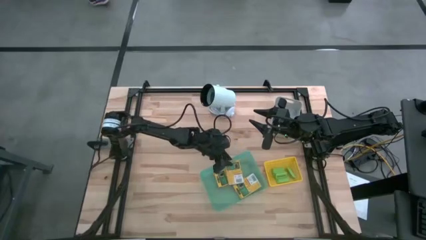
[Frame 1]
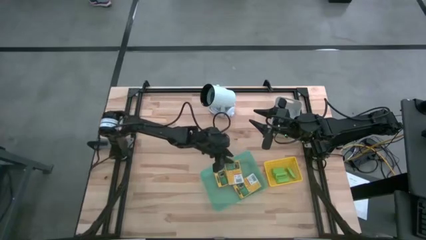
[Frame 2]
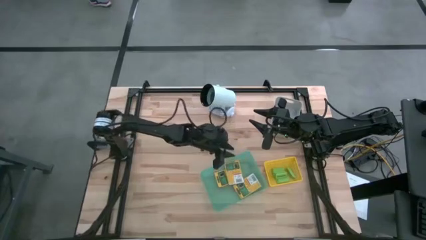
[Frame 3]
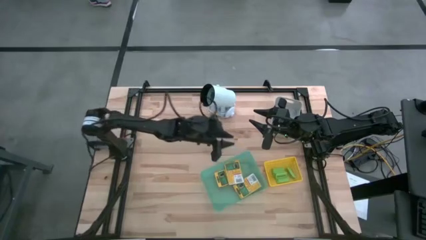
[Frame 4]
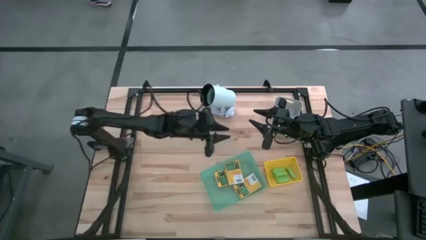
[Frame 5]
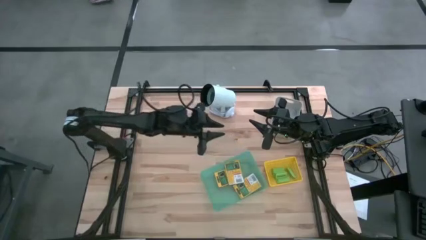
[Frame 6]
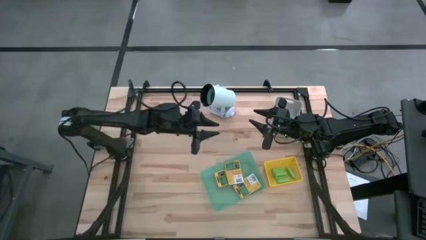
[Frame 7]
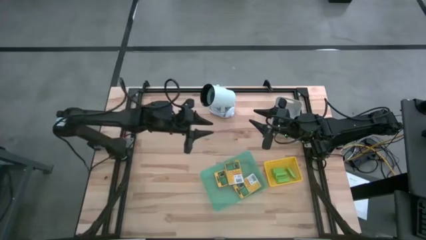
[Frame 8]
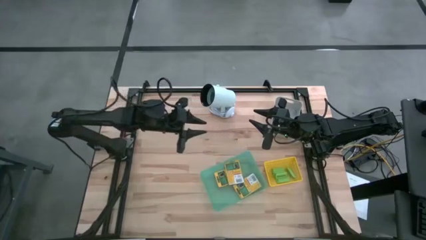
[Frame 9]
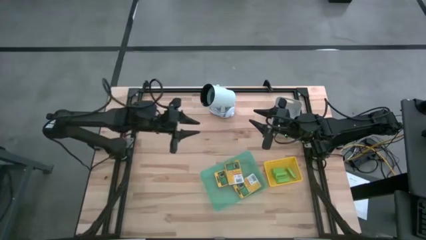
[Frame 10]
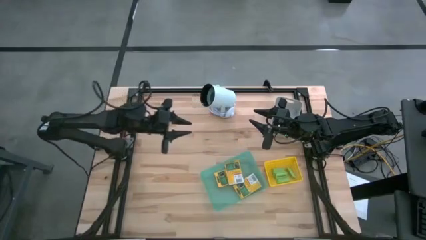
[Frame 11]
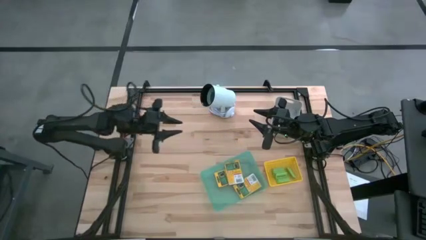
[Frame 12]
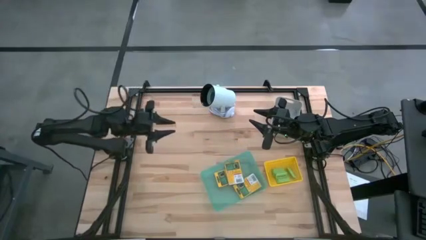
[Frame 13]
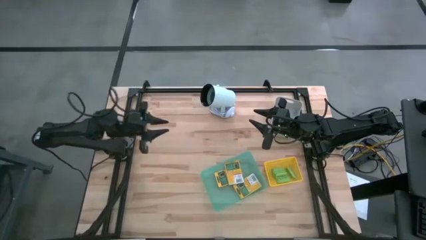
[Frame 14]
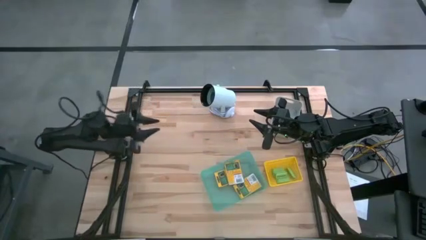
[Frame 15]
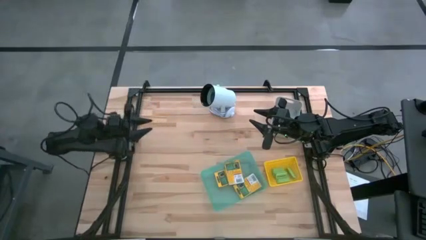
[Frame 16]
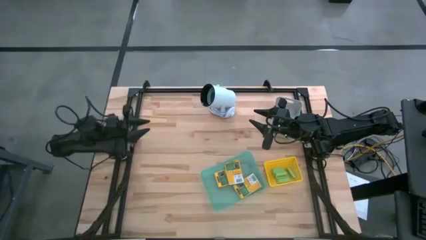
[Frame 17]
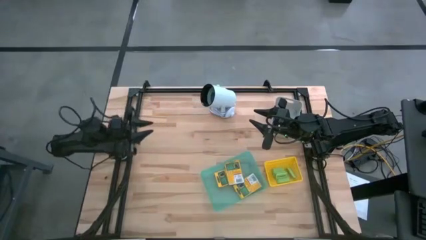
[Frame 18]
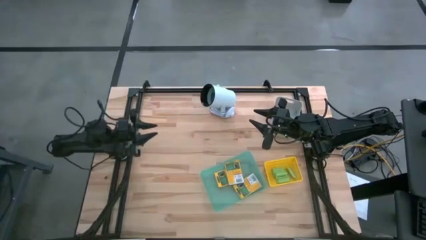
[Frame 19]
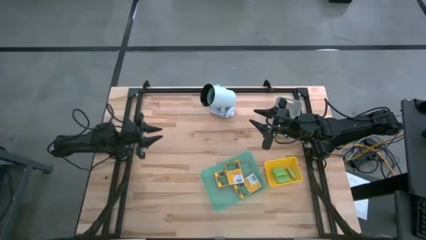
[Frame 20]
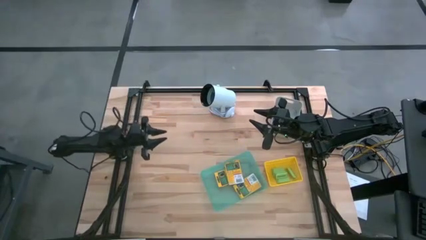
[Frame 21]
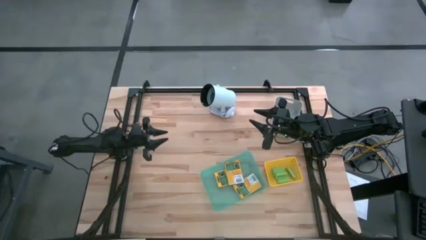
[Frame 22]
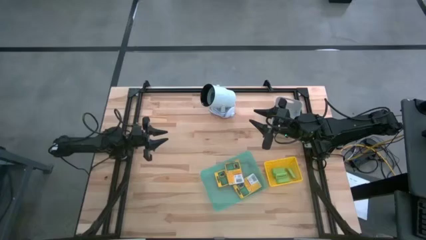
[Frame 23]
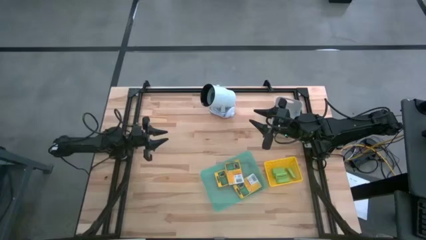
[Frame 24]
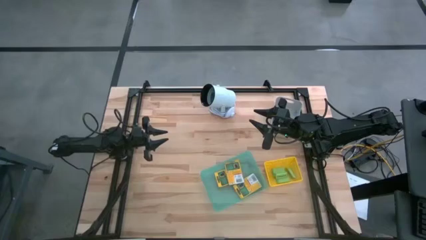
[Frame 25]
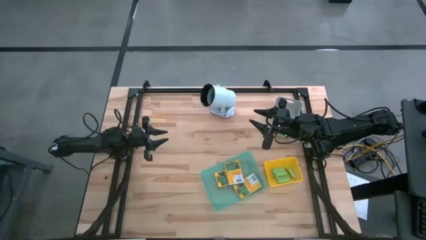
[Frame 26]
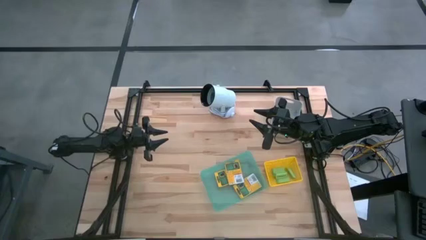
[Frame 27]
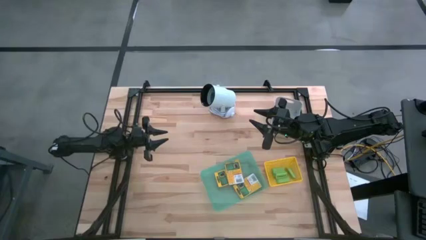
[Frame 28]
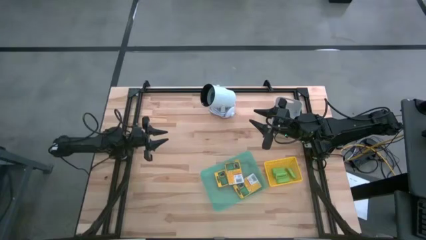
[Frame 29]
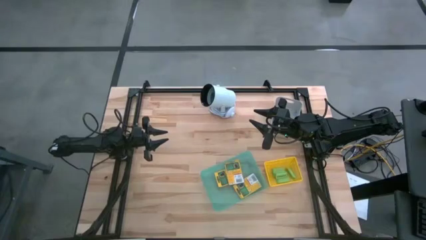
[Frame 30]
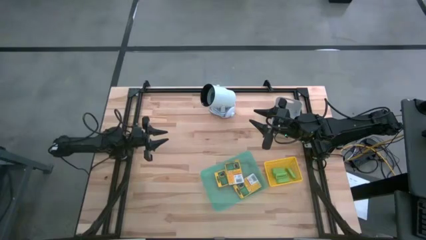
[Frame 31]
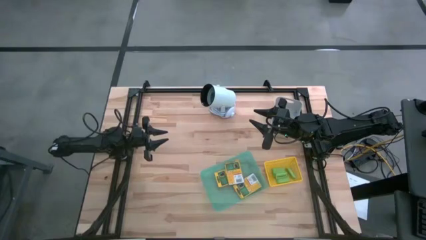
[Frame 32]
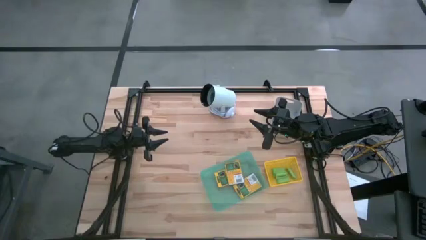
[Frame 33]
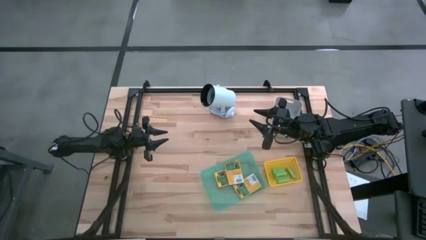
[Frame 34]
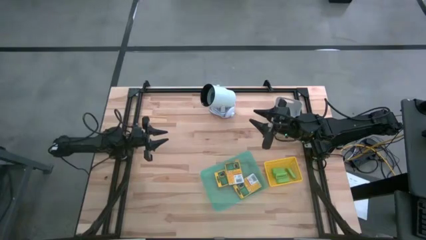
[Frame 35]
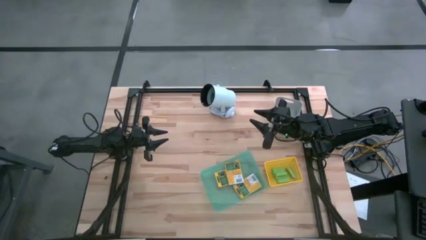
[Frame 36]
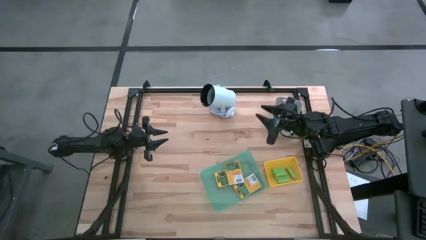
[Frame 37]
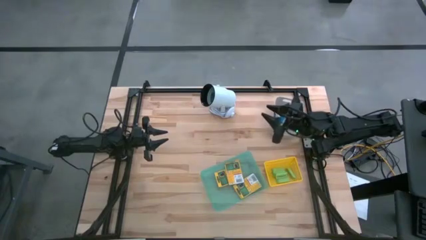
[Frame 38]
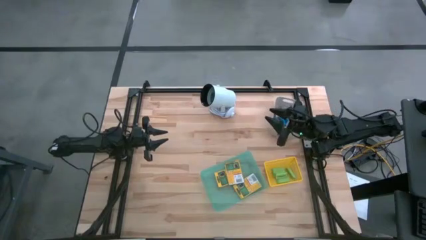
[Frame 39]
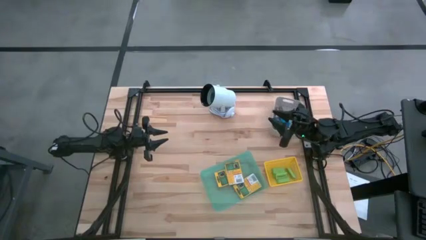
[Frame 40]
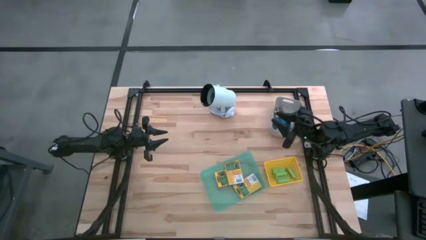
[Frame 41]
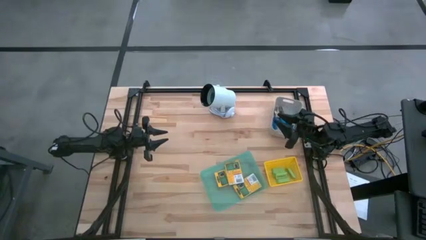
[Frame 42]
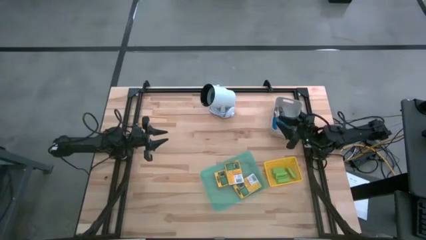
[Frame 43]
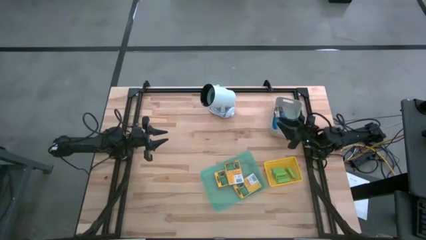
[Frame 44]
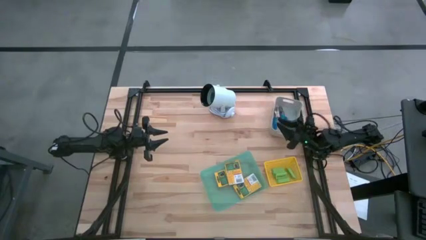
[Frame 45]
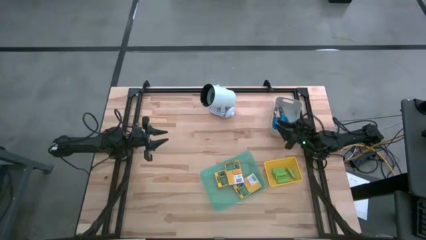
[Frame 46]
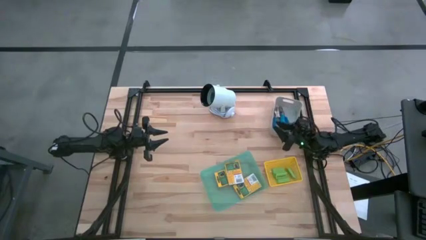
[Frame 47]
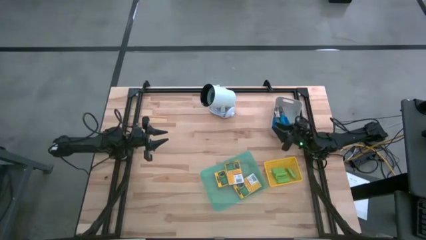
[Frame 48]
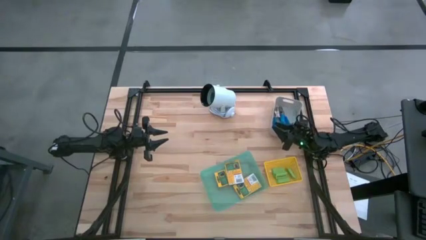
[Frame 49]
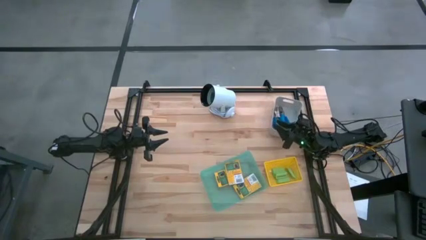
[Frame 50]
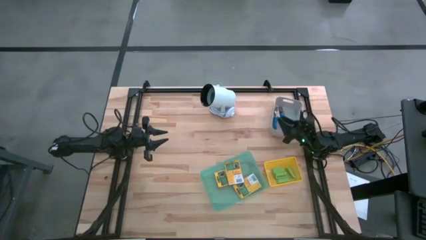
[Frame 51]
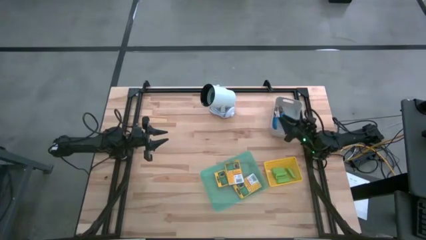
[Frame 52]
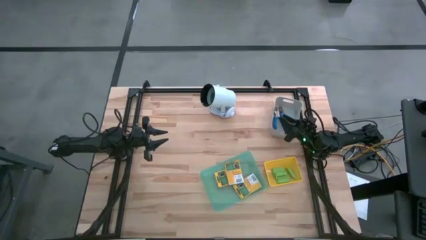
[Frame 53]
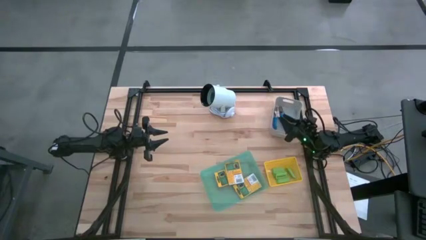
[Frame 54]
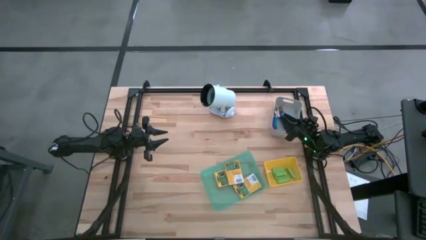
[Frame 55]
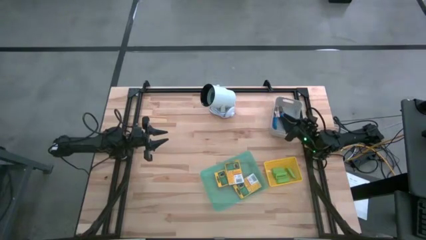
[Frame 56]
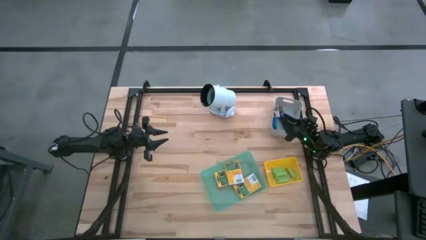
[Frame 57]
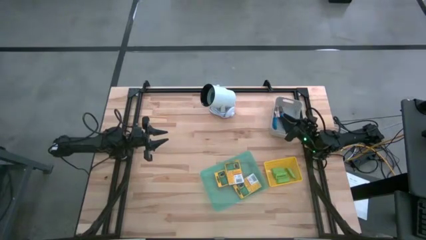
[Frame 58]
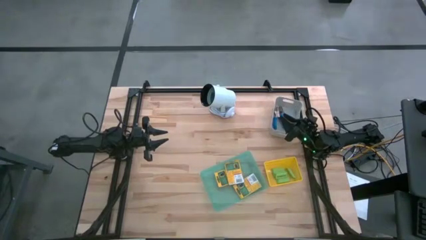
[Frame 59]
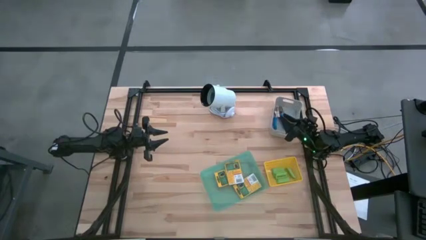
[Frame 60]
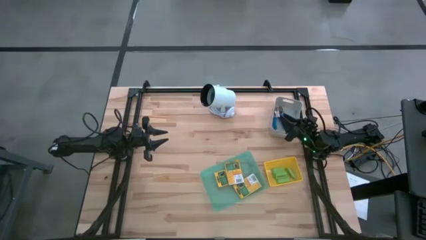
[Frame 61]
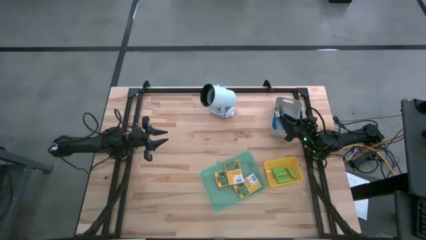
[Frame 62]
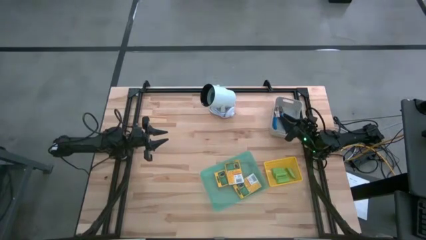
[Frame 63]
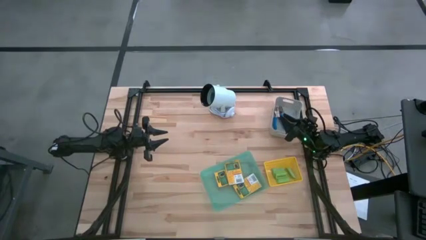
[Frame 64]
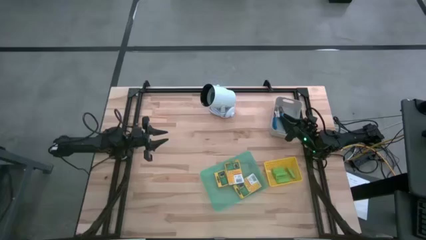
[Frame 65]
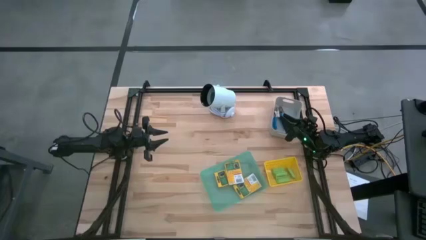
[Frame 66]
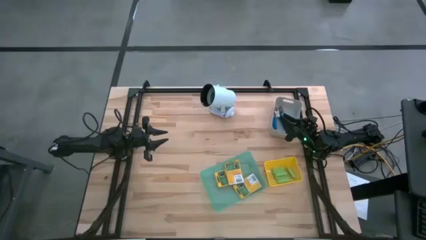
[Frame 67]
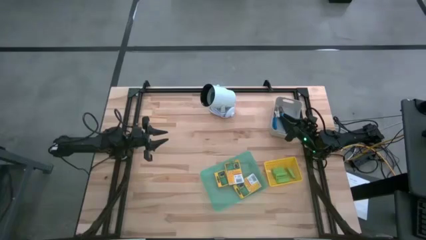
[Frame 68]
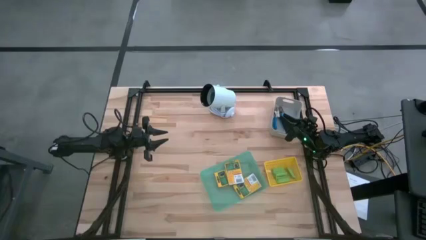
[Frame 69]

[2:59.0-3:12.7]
Task: Pick & Place School Supplies
Return to Home Position
